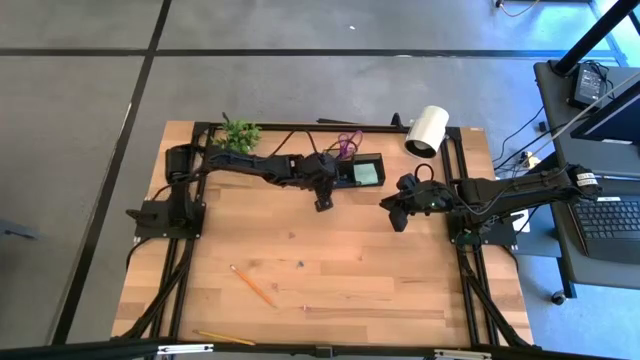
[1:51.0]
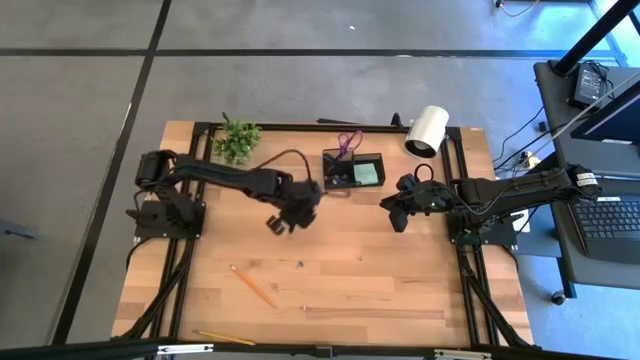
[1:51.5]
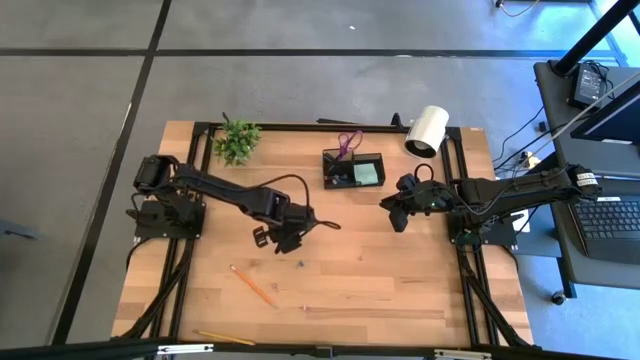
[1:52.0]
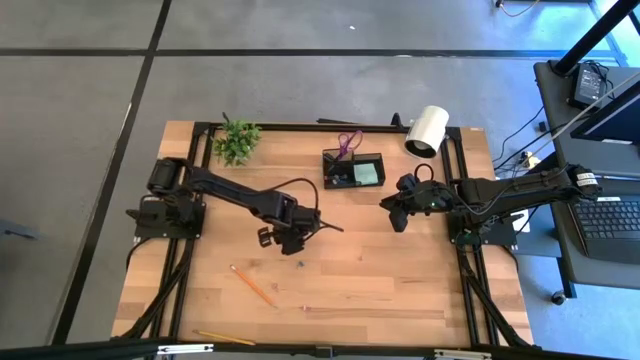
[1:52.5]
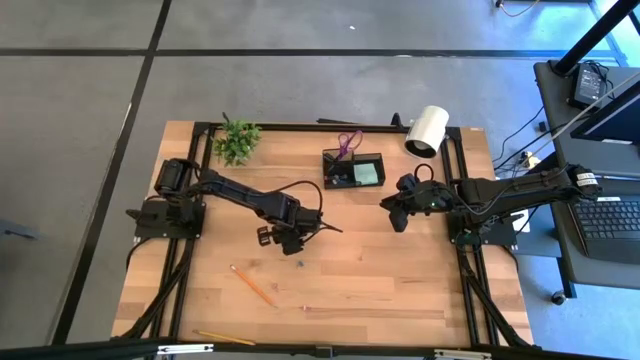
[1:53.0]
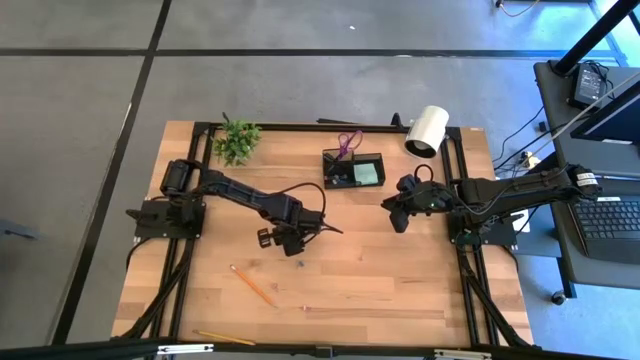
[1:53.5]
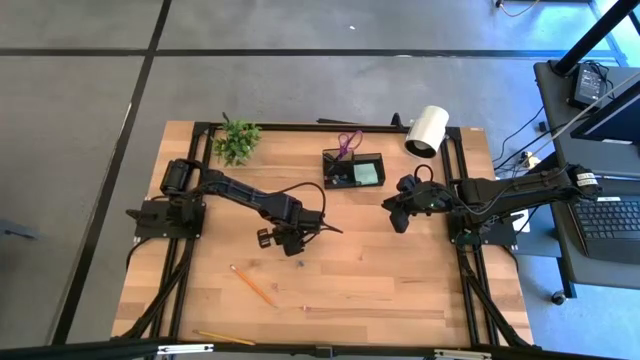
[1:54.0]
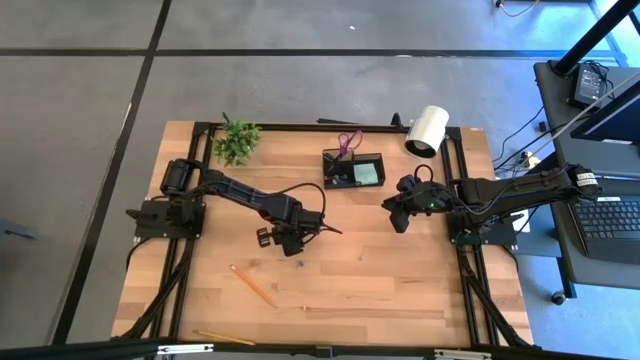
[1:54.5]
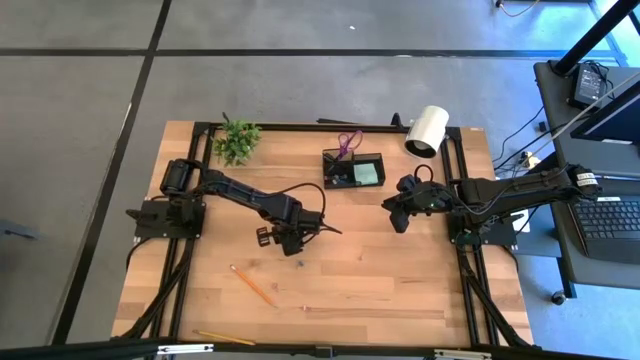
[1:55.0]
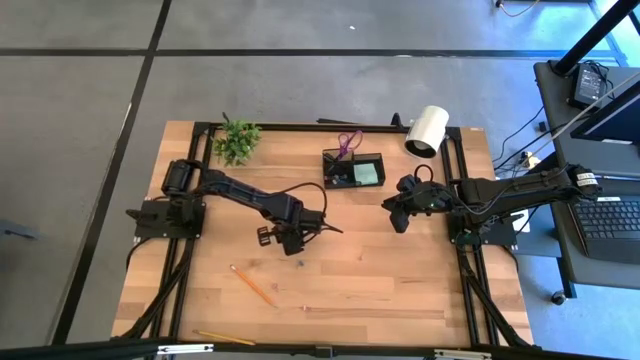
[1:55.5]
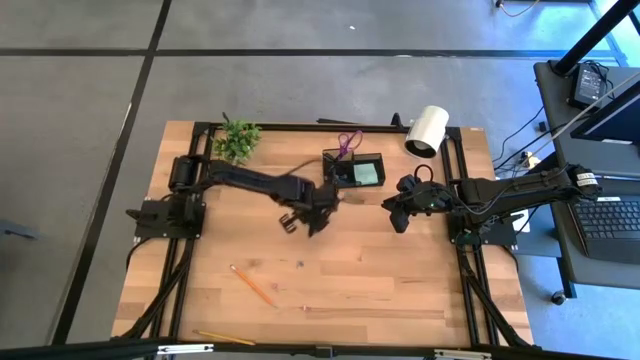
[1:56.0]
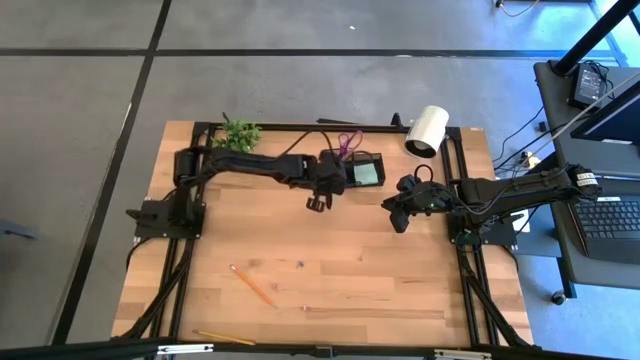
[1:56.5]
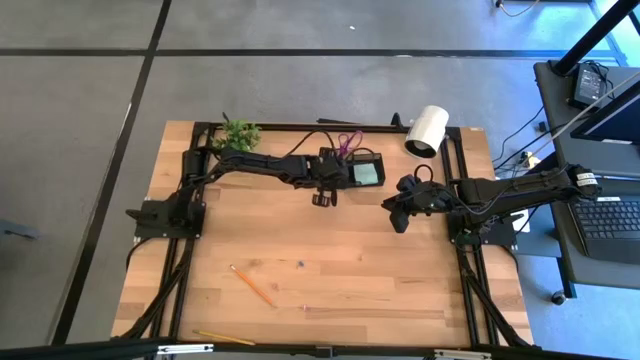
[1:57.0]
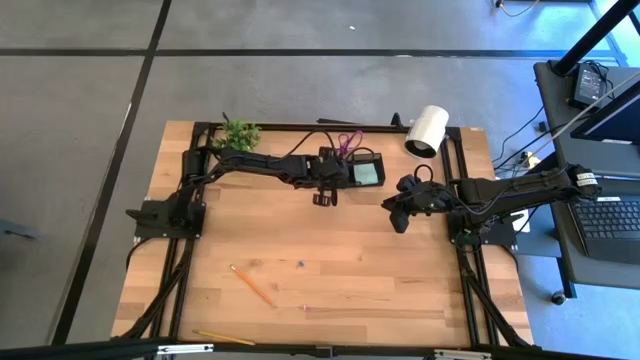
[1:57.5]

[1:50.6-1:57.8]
Task: Pick and place office supplies into organizer
Put the pink binder clip into the black desk organizer

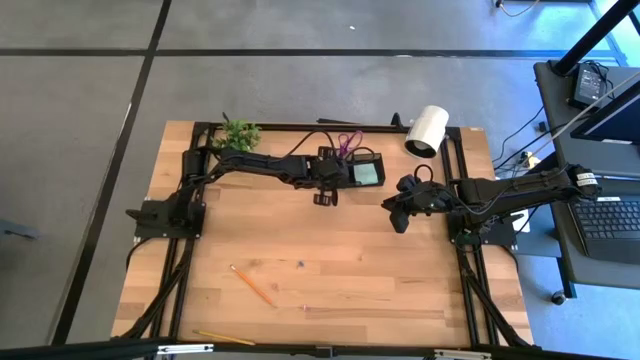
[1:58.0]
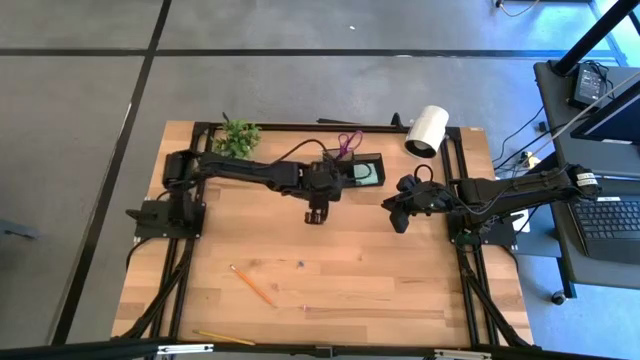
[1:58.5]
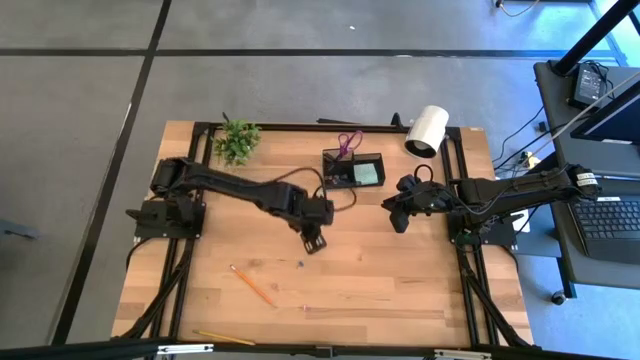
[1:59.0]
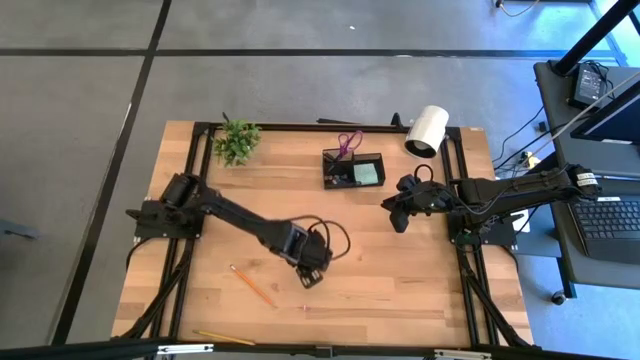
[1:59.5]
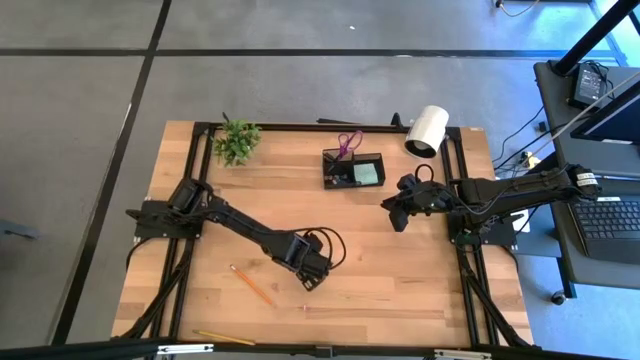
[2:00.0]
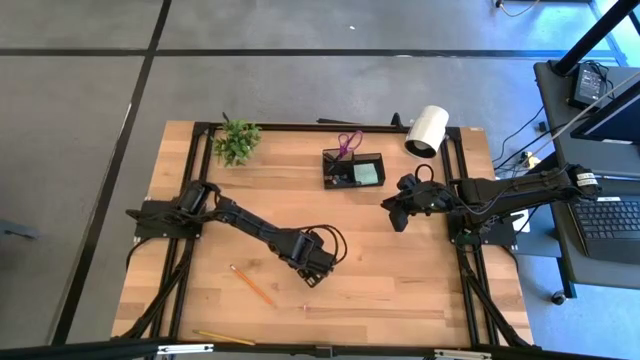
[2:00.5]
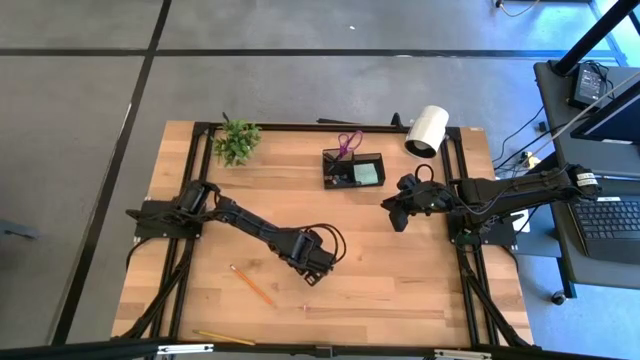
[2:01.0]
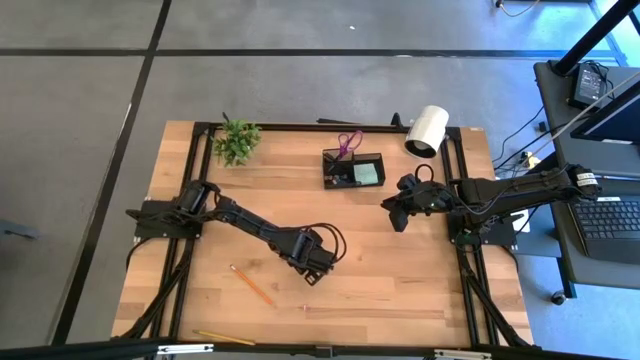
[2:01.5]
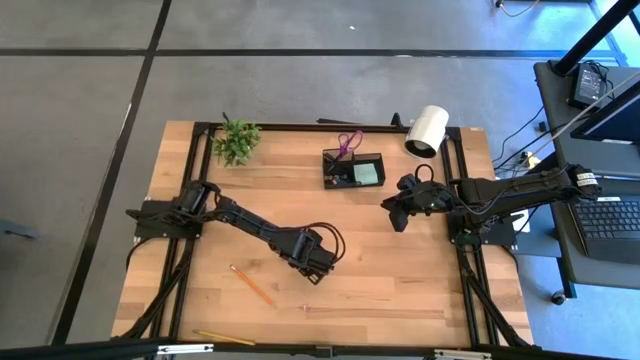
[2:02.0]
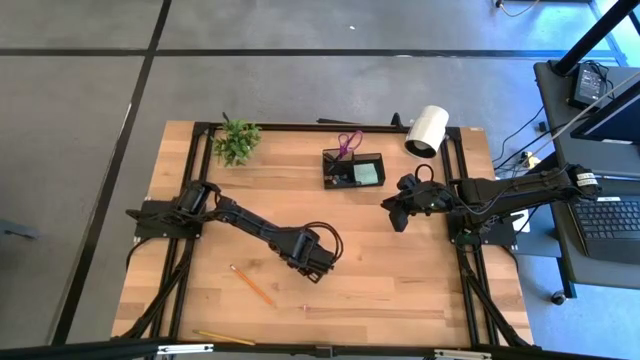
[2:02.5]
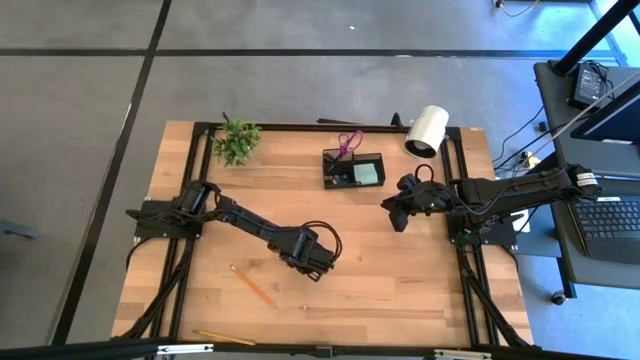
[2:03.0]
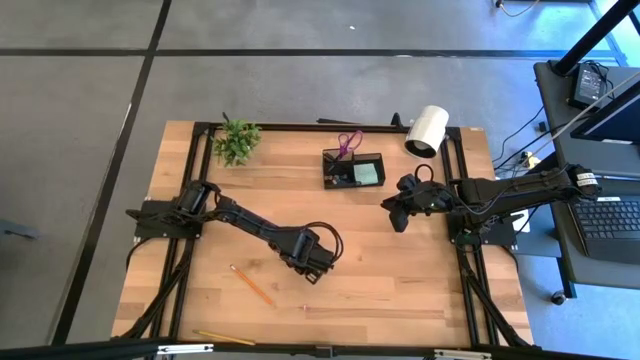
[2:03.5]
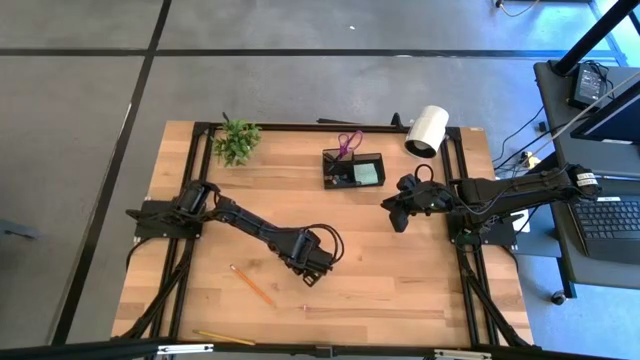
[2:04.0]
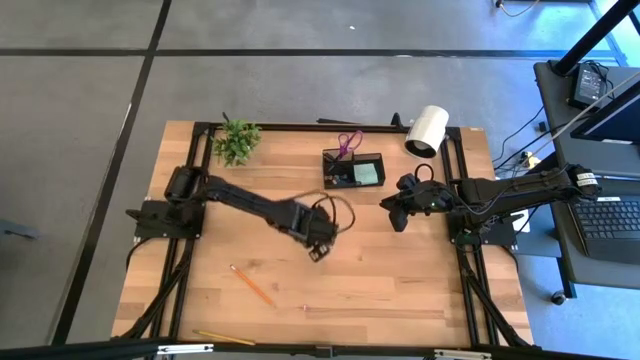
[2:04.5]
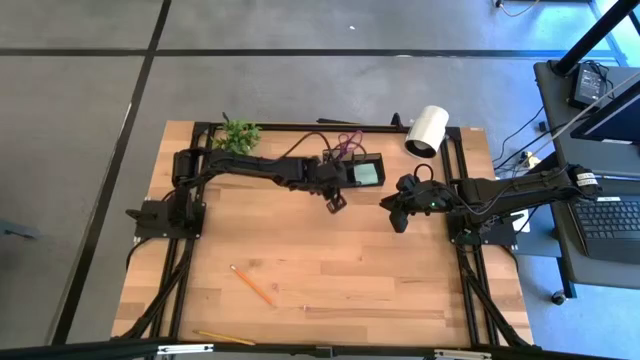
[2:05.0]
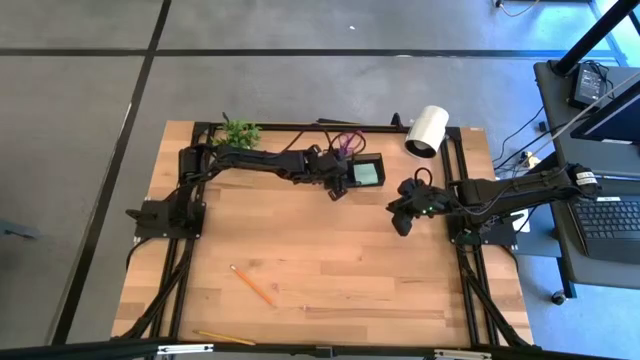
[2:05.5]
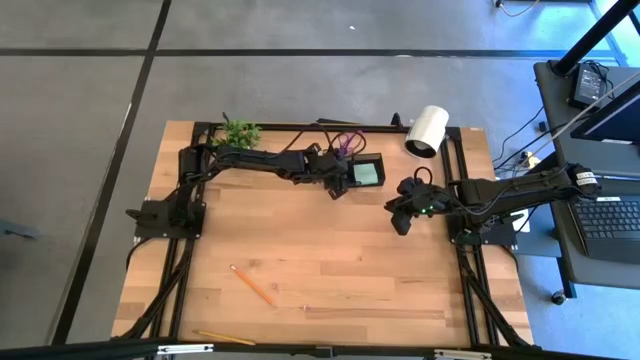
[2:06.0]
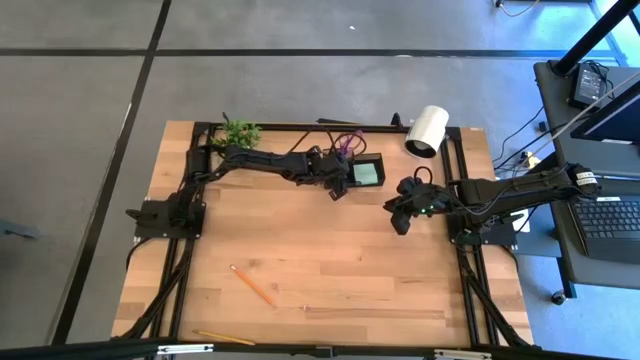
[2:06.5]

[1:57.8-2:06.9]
Put the blue binder clip into the black desk organizer

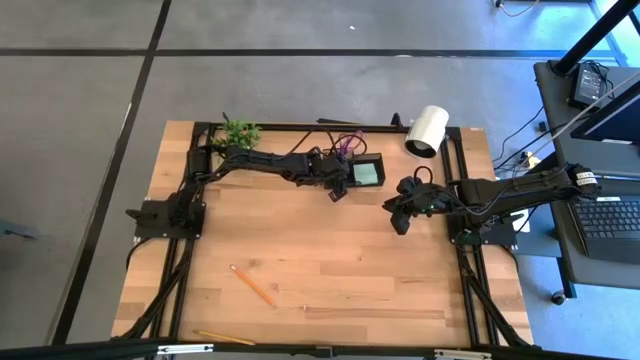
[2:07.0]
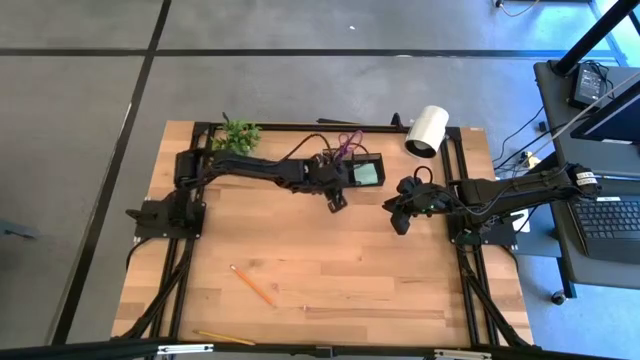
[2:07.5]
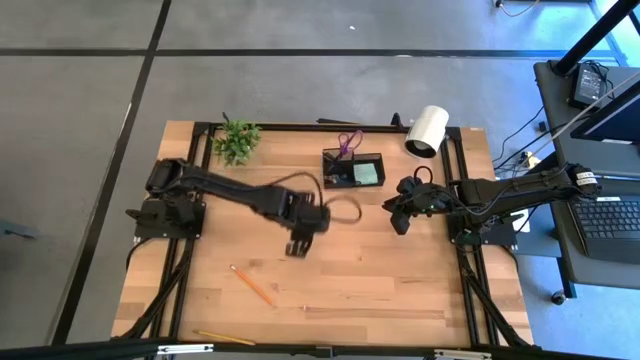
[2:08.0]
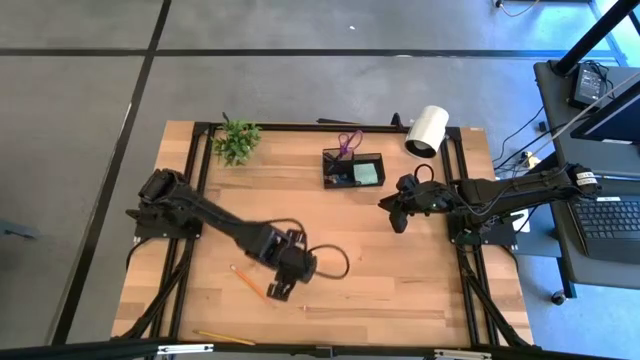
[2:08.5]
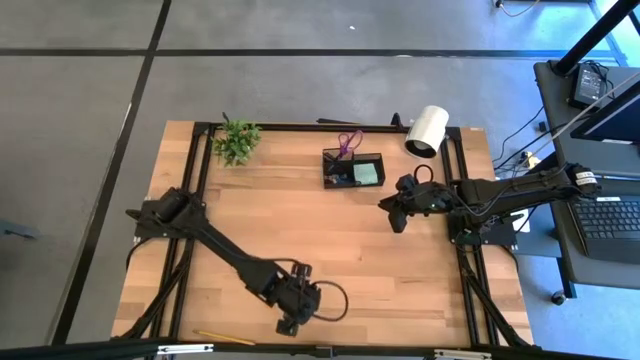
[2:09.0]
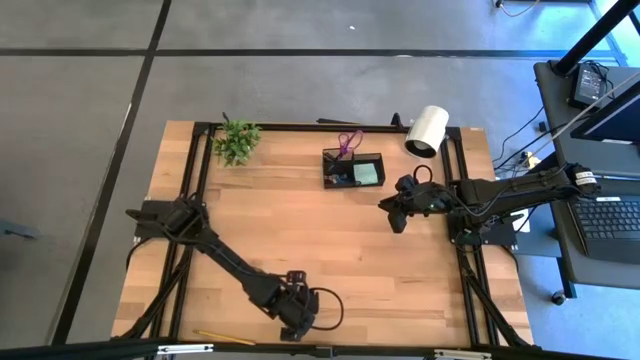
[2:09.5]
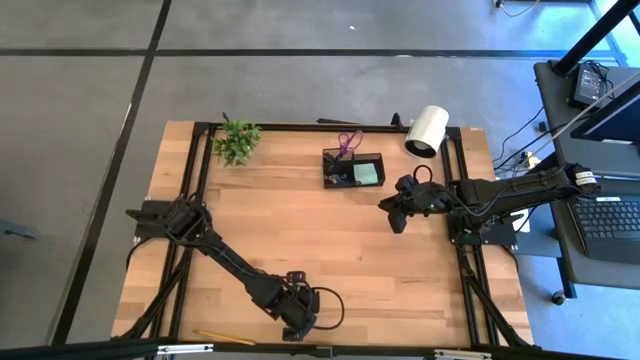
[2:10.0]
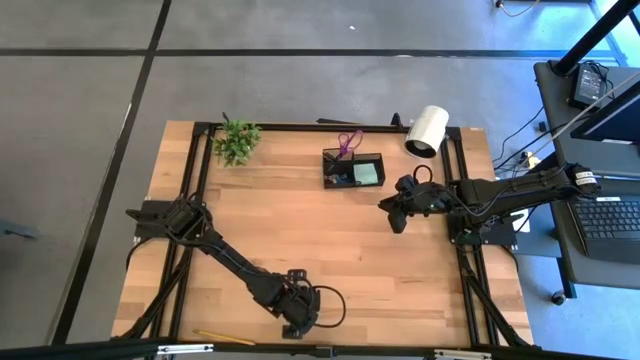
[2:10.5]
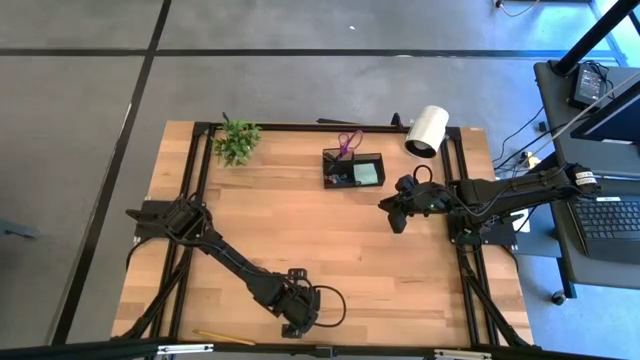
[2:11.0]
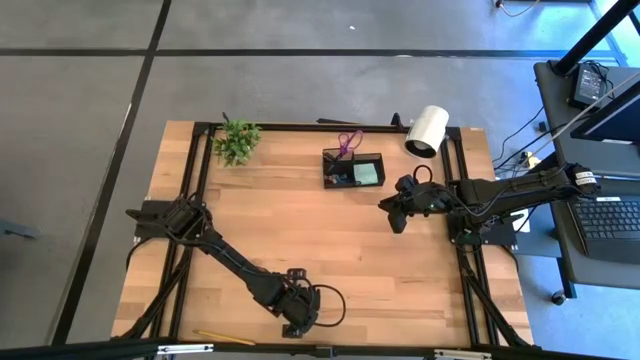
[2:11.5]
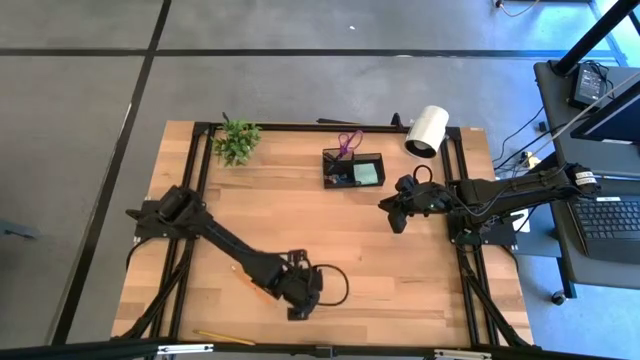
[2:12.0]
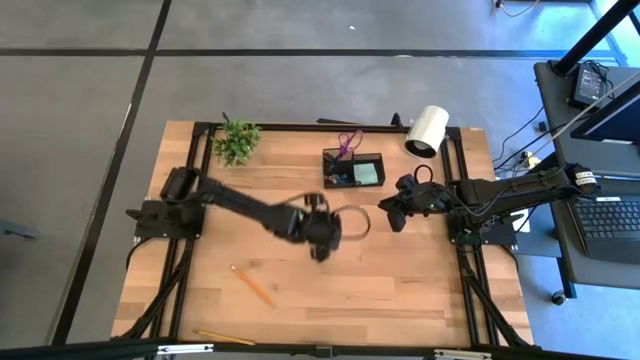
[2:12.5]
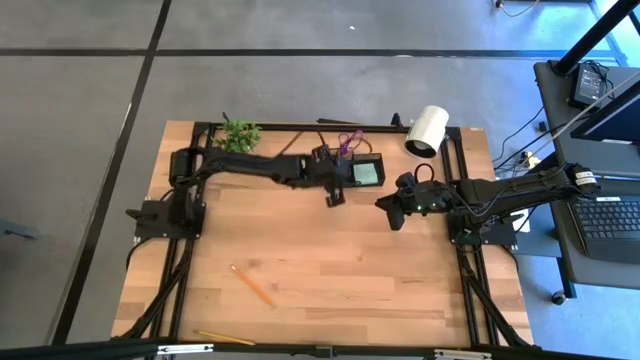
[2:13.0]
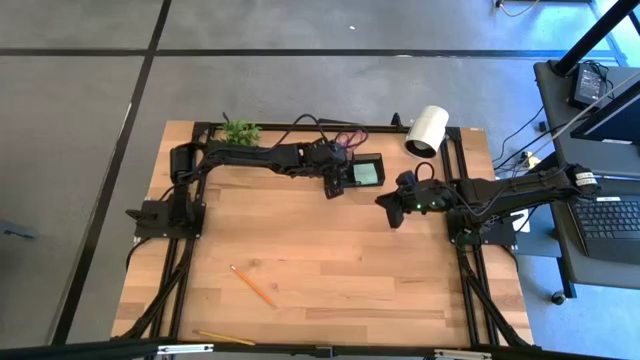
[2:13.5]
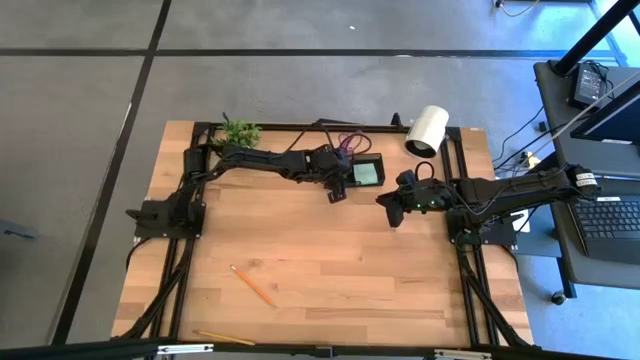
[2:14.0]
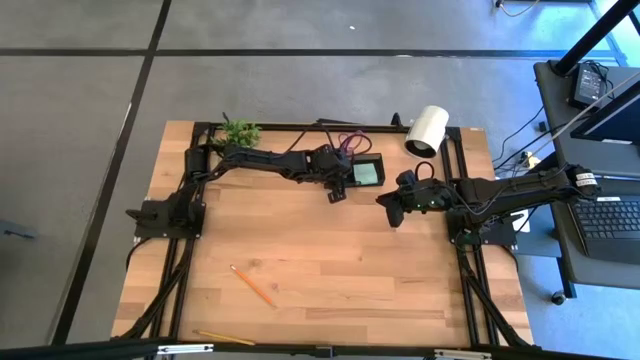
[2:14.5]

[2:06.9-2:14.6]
Put the pink binder clip into the black desk organizer
